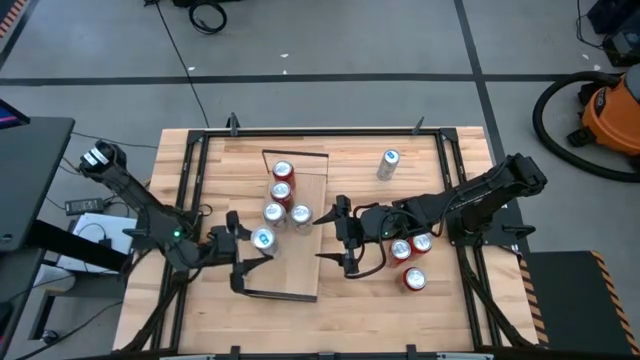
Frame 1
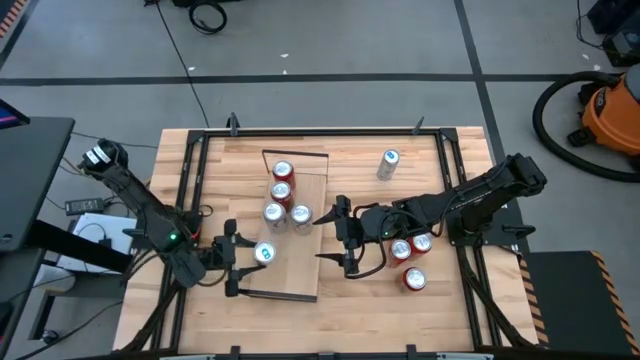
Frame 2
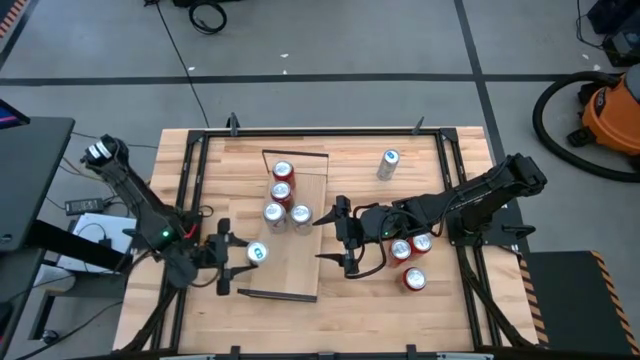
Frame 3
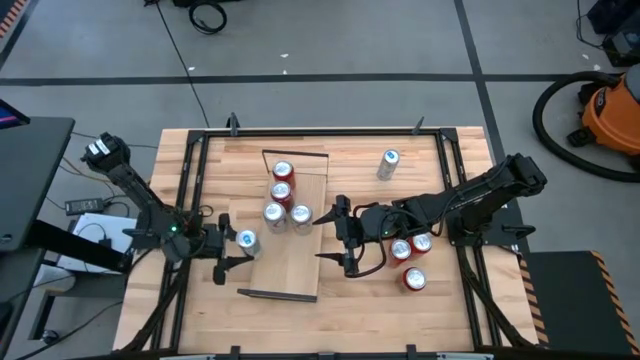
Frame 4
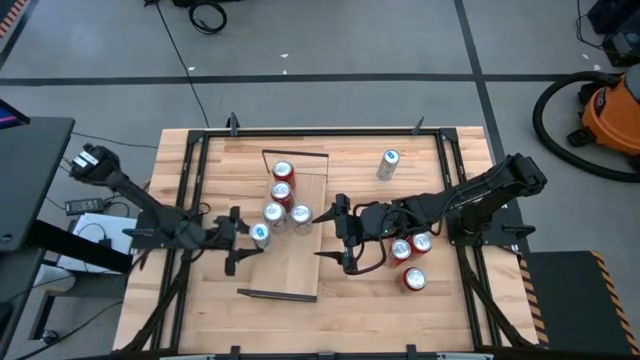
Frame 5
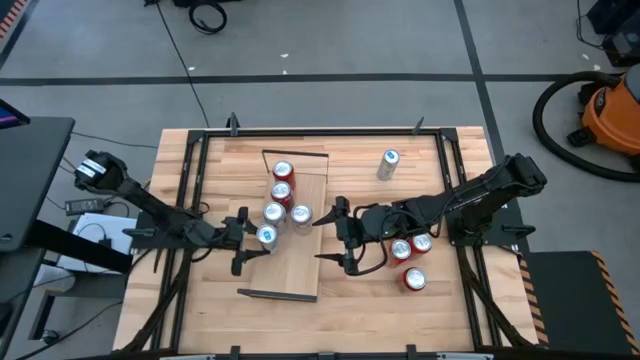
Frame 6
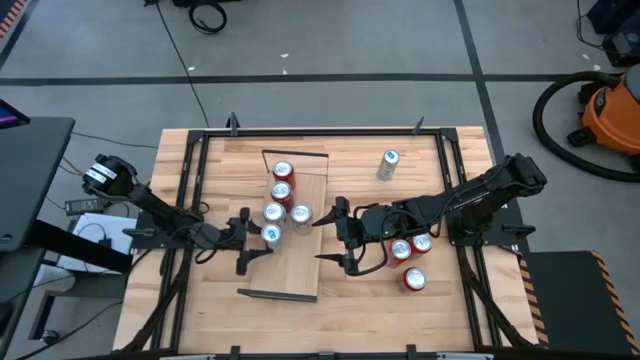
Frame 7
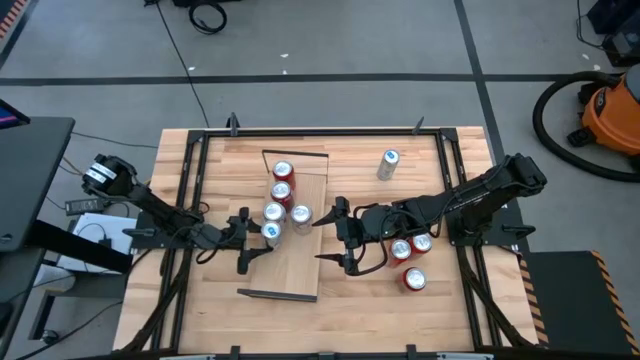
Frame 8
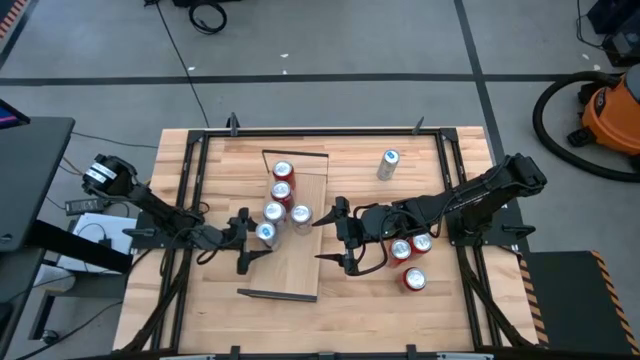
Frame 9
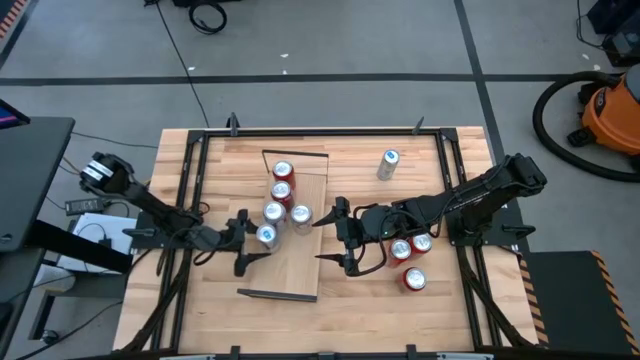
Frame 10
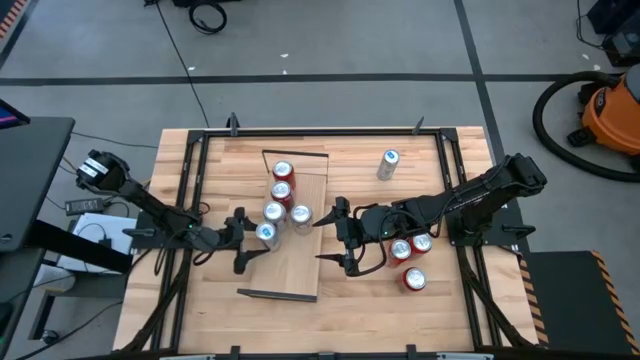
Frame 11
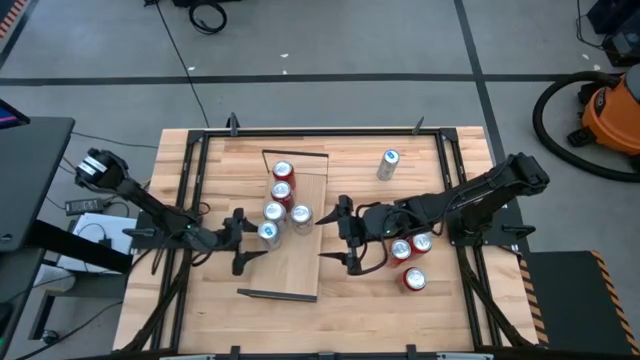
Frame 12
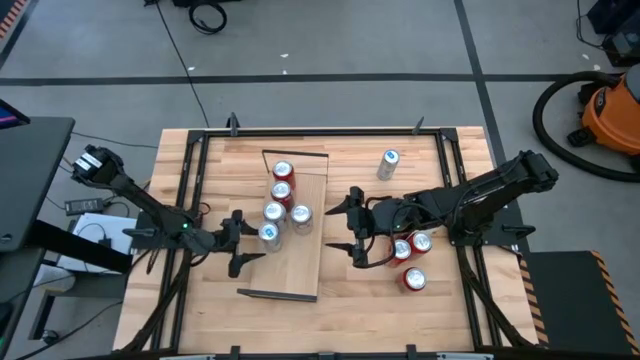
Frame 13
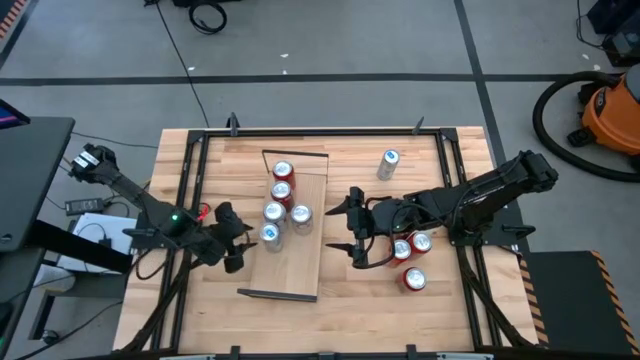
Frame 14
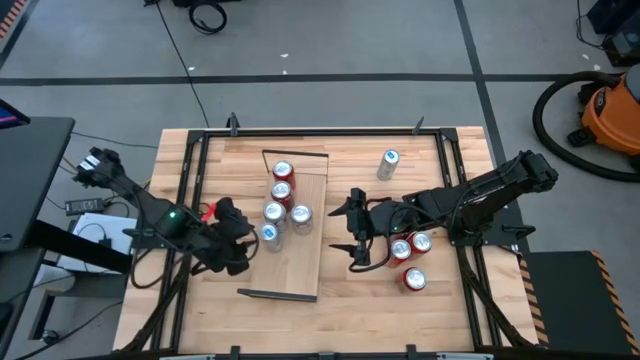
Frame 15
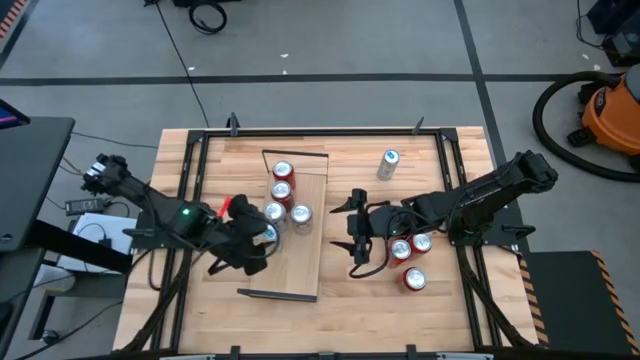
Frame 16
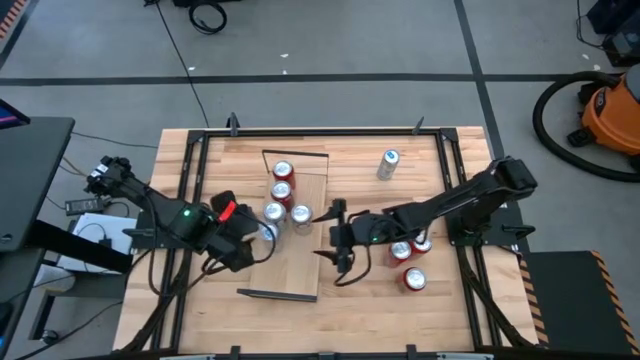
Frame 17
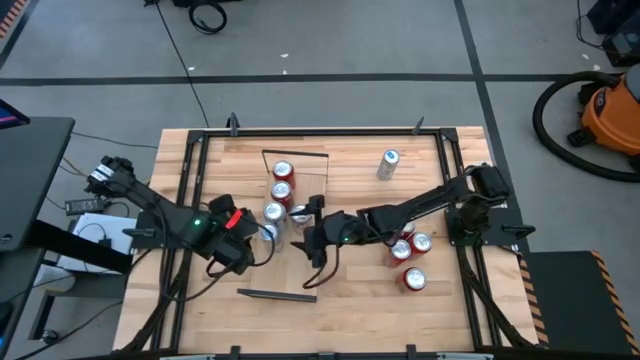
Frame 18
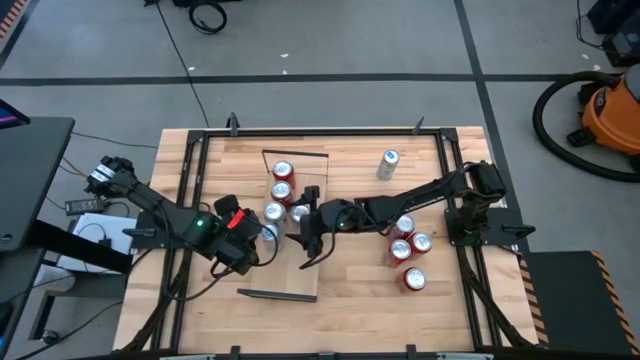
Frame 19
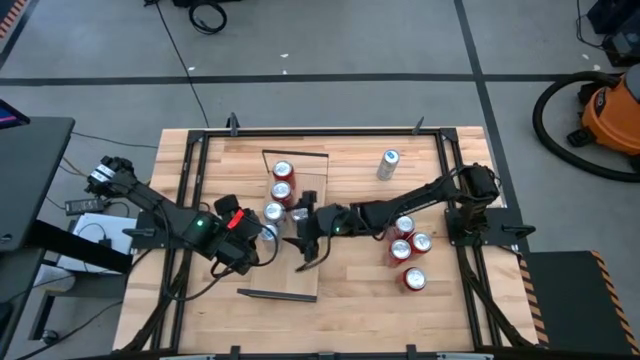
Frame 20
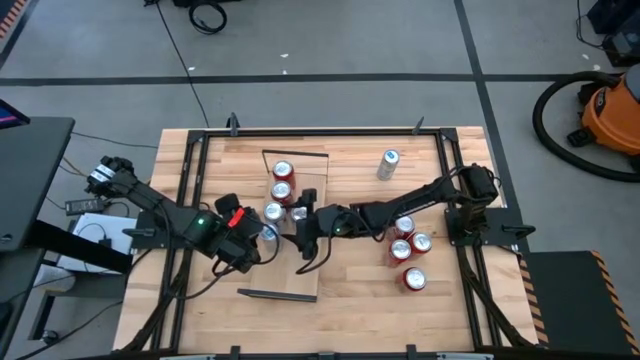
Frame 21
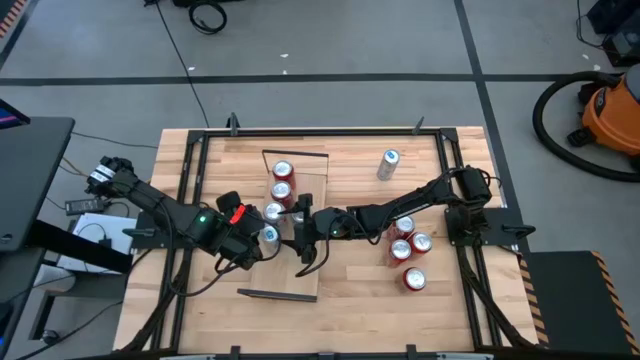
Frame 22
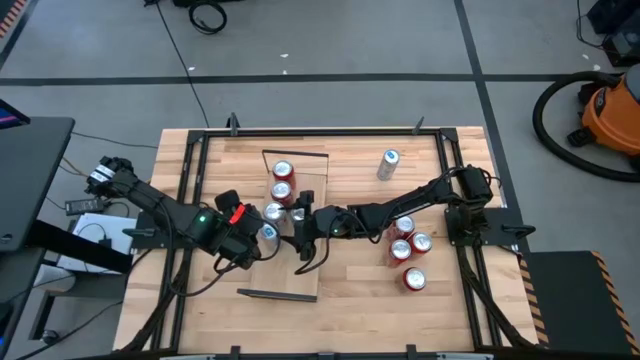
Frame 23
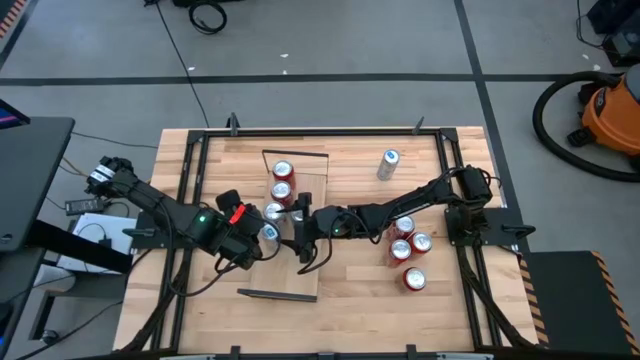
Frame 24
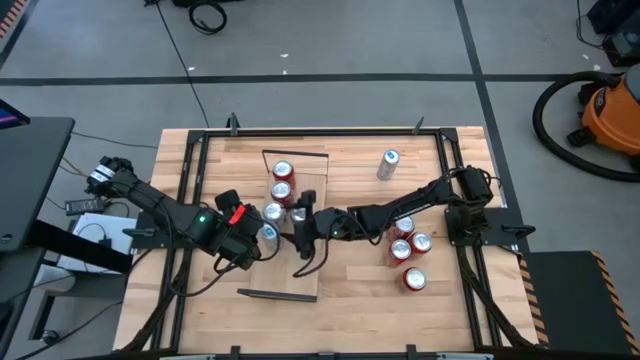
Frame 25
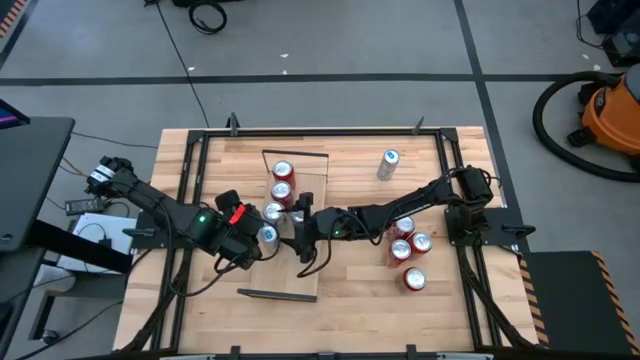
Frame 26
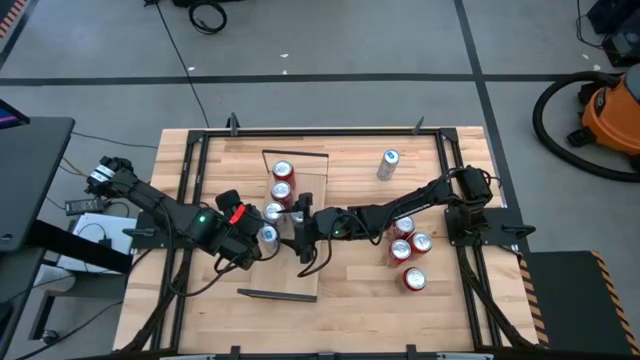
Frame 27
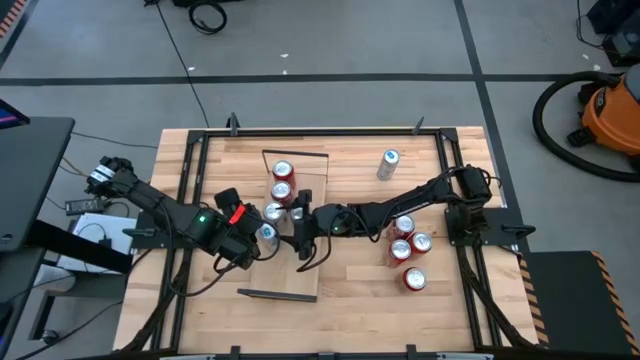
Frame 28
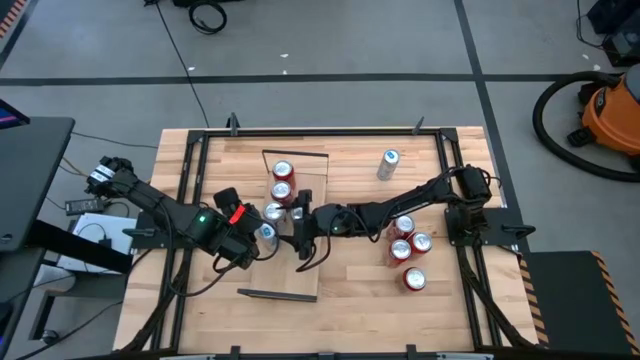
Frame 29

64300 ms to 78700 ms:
Task: Place canned beverage on shelf
Put the bottom blue soda can on the shelf

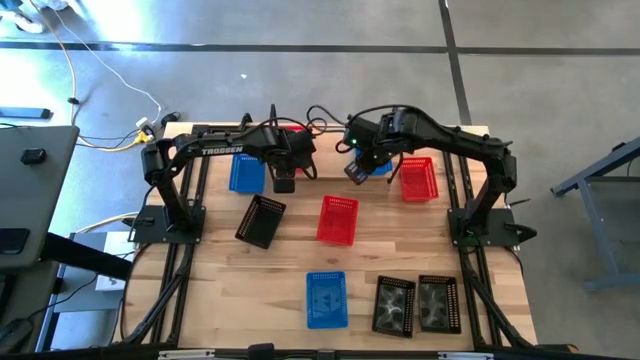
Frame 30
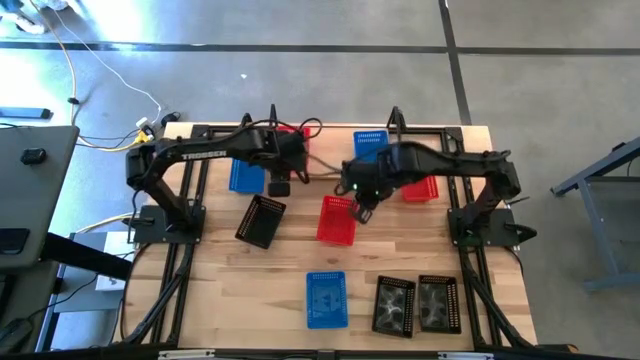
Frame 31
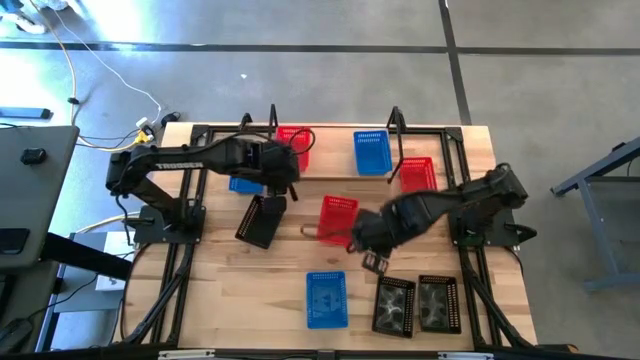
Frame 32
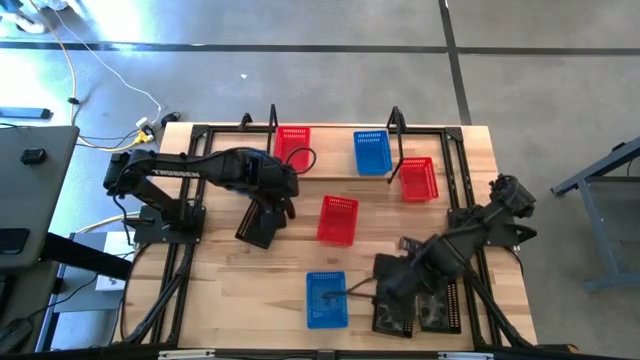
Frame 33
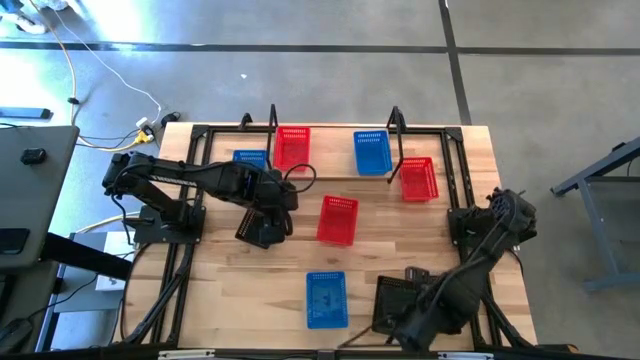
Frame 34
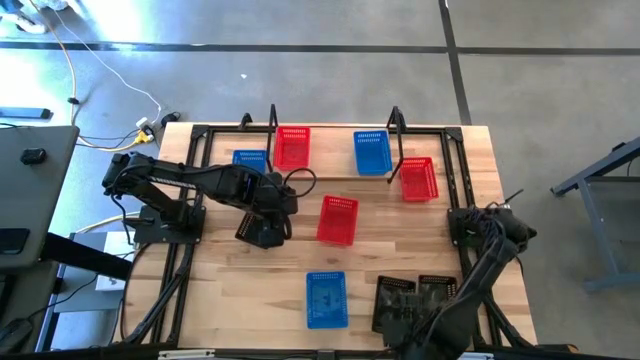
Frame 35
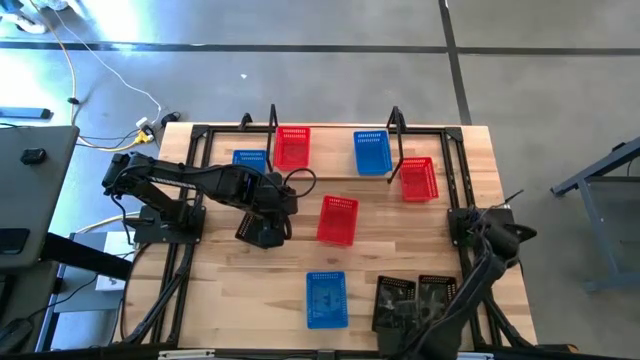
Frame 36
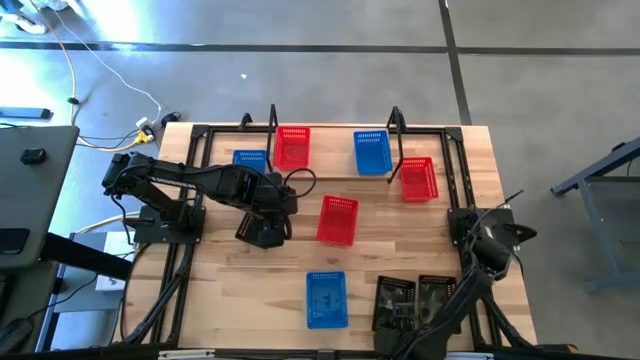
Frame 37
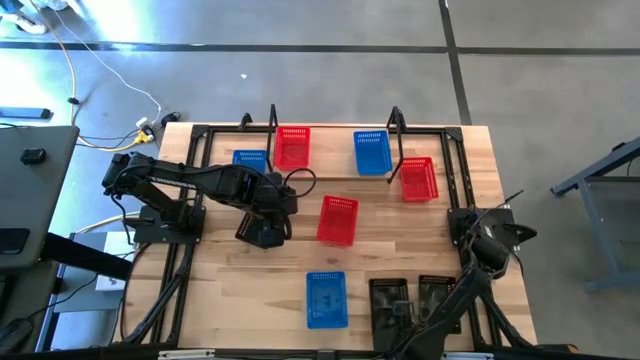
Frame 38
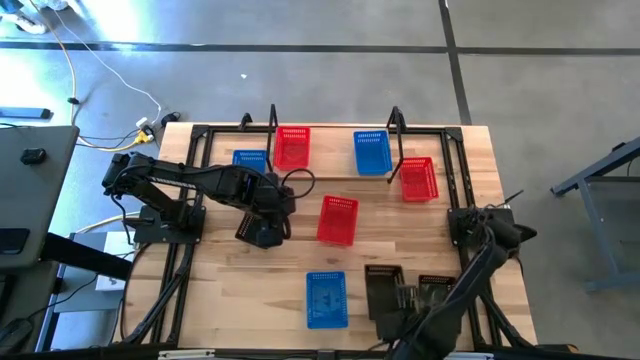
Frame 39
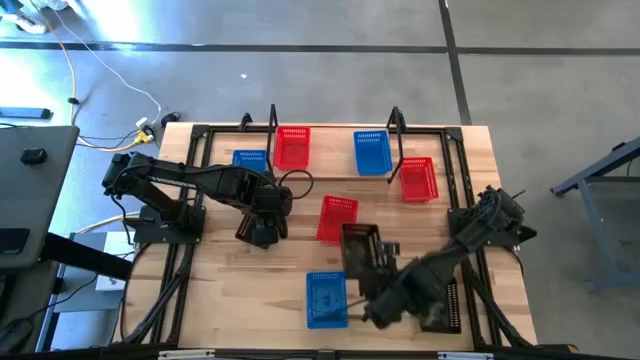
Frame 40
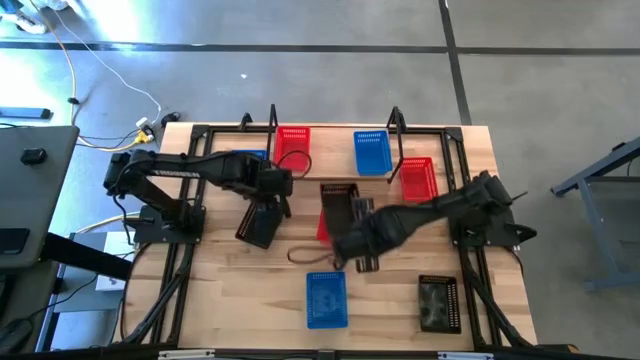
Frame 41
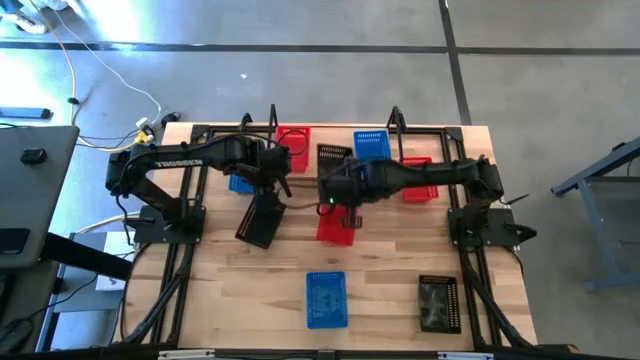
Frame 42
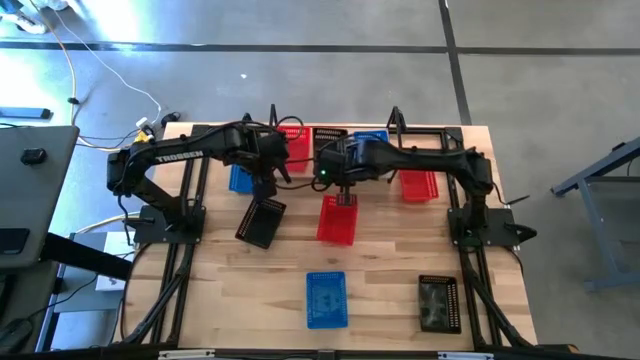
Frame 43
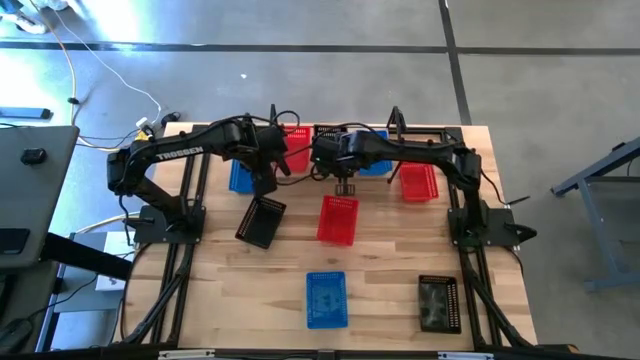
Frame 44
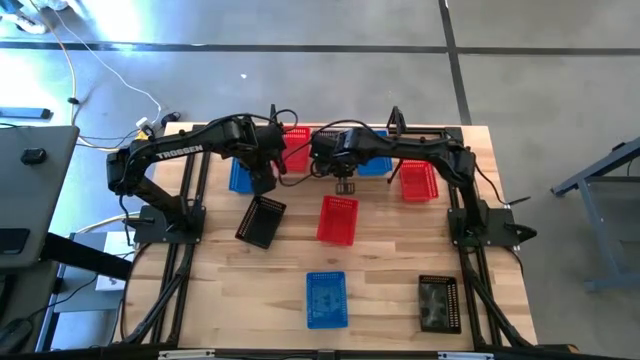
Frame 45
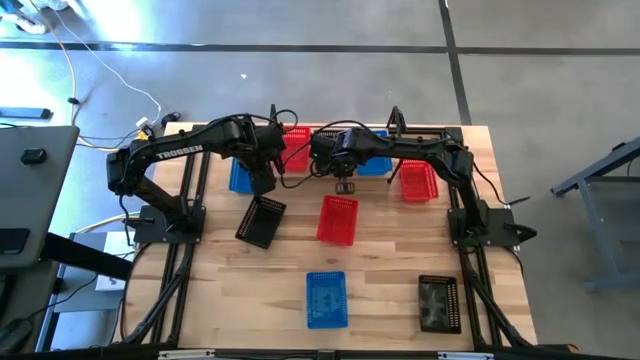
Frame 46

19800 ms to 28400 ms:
Task: Stack baskets on shelf by color
Put the bottom left black basket on the shelf
